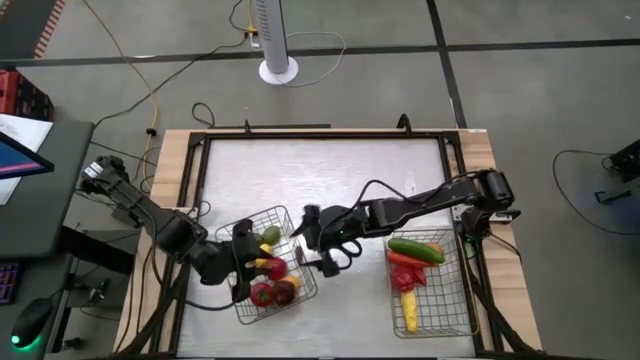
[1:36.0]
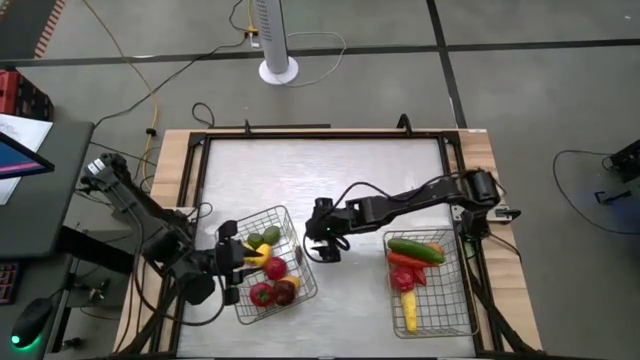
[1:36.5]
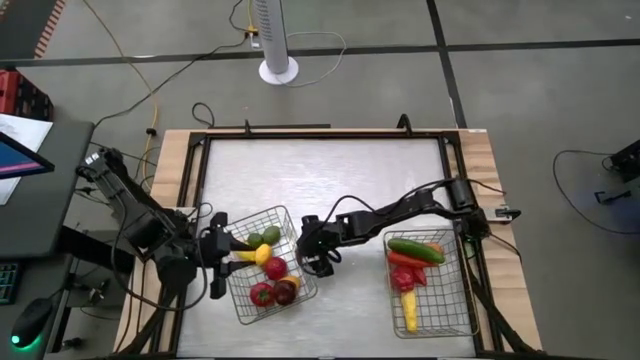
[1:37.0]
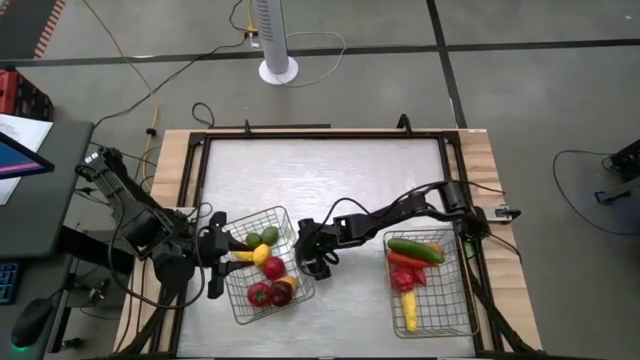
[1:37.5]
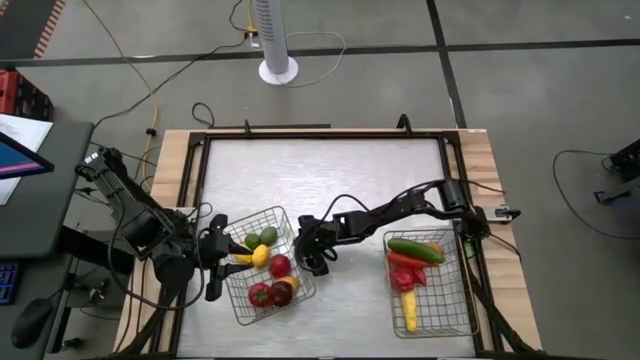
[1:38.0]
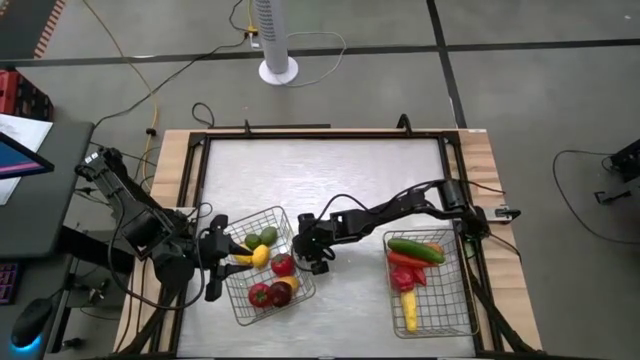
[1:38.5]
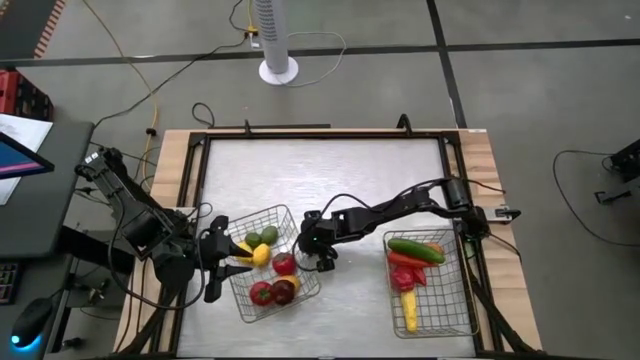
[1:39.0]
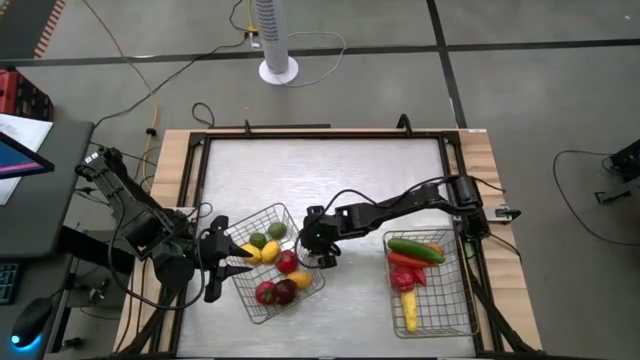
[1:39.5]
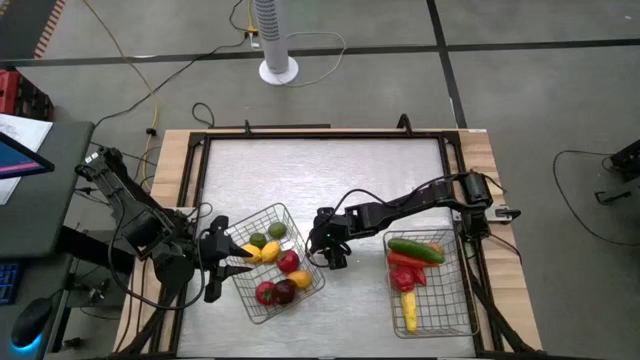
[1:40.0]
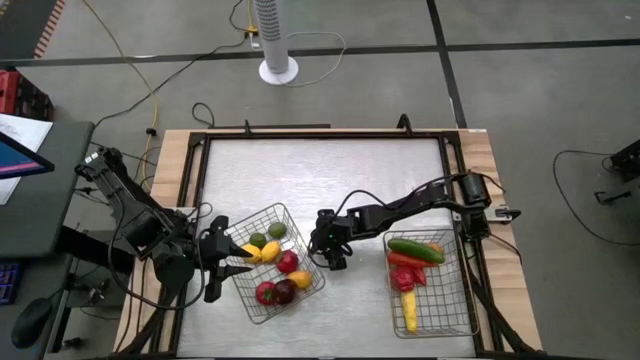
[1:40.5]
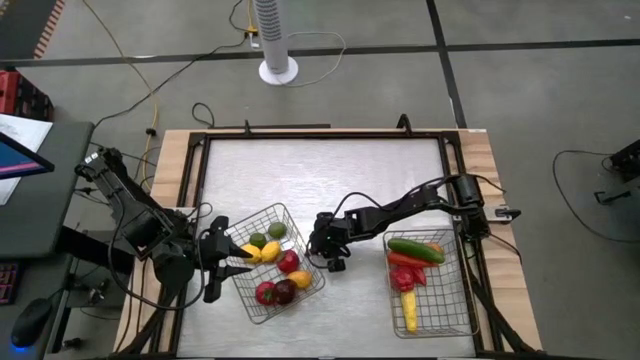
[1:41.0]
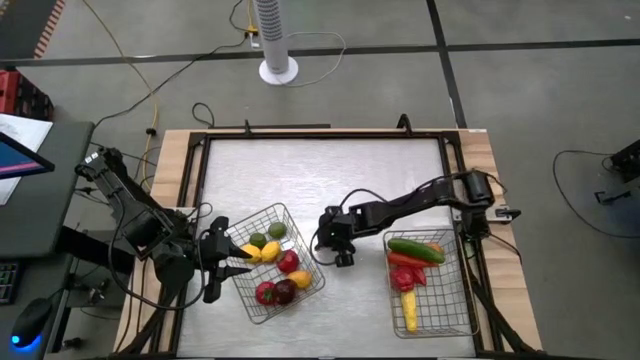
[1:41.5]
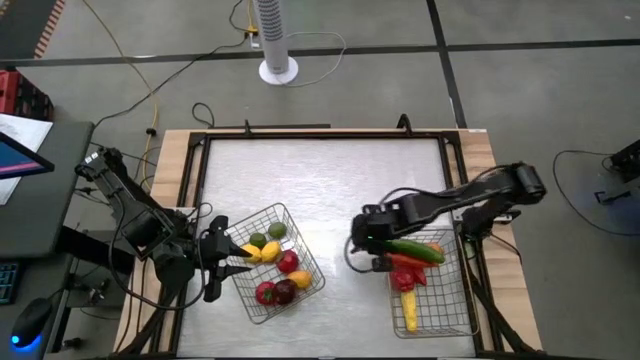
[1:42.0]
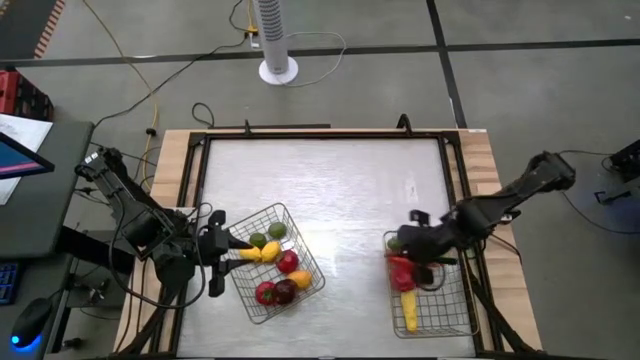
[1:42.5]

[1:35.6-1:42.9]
Task: Sort produce into baskets
Put the purple eggplant into the right wire basket

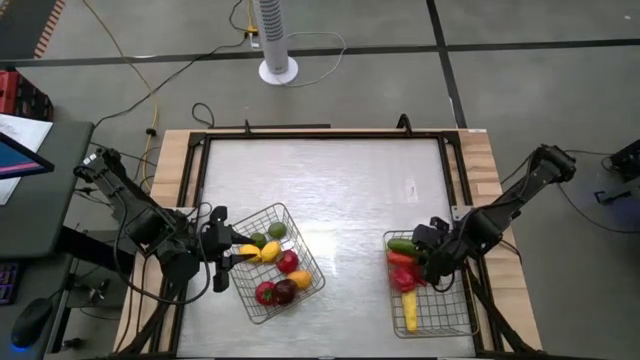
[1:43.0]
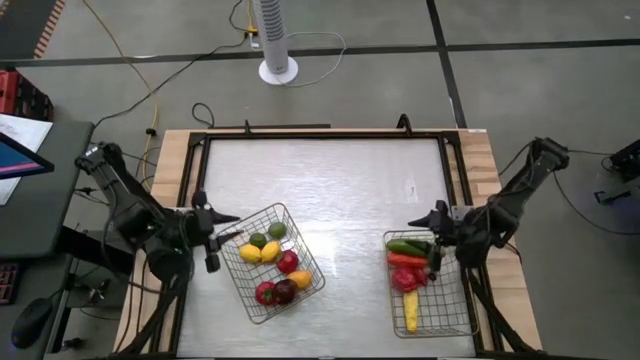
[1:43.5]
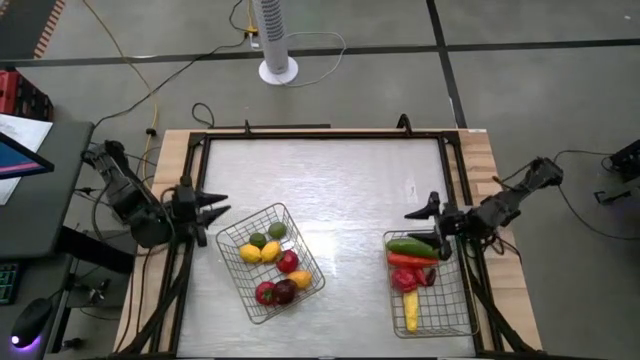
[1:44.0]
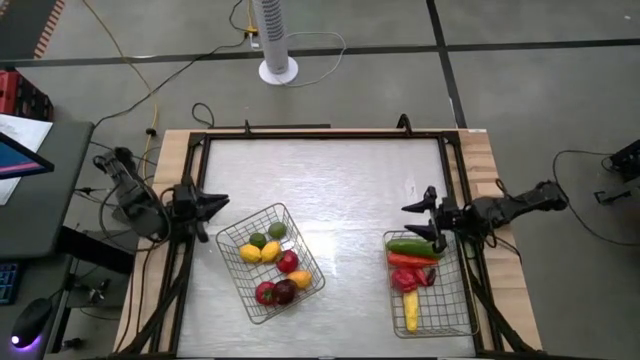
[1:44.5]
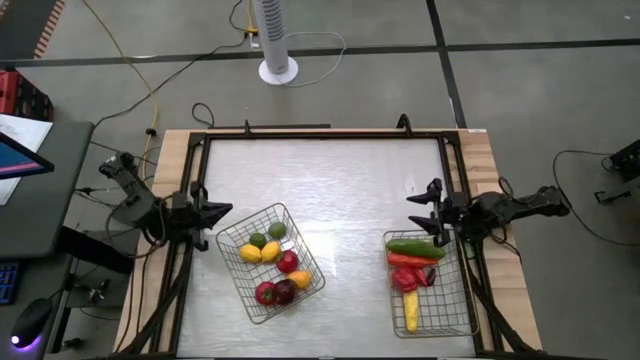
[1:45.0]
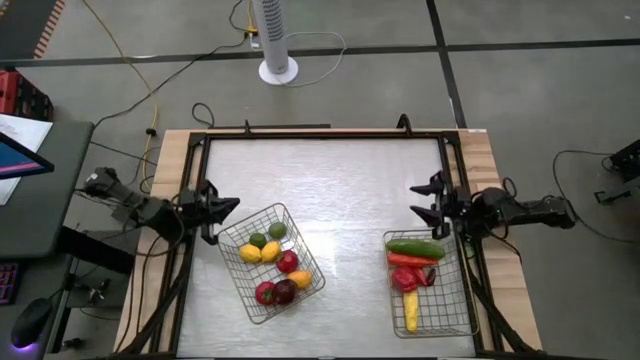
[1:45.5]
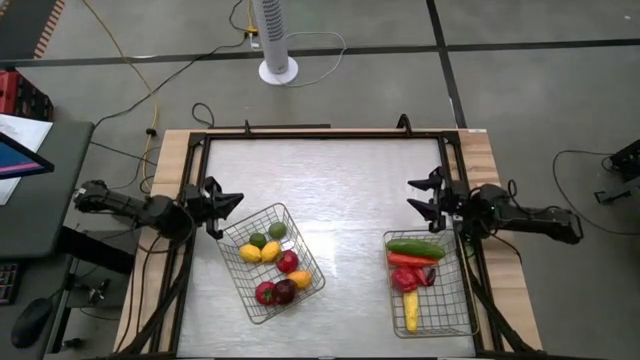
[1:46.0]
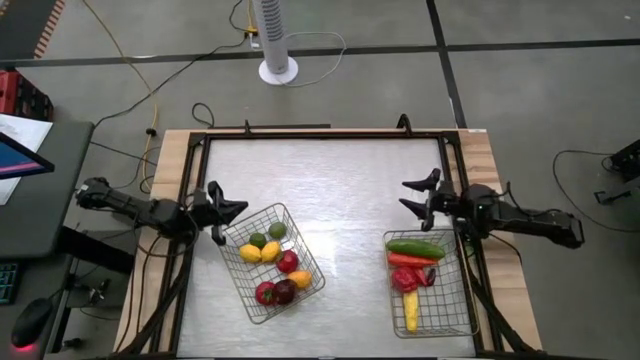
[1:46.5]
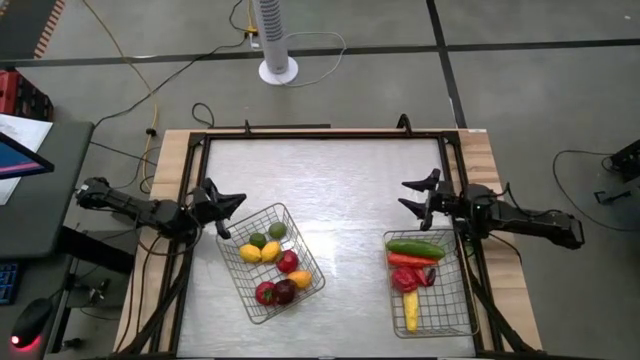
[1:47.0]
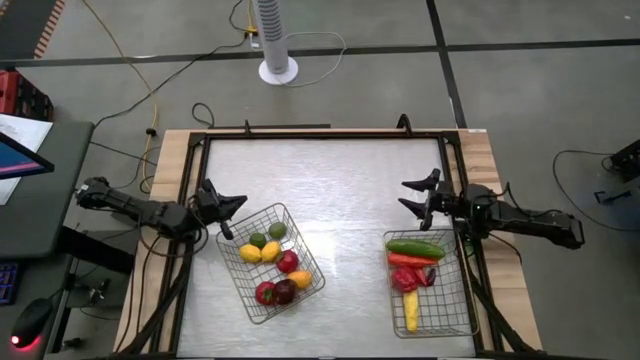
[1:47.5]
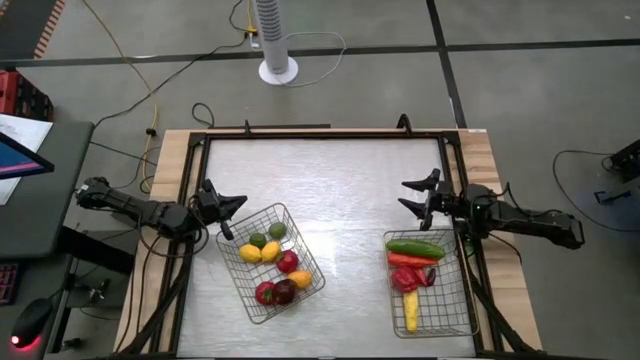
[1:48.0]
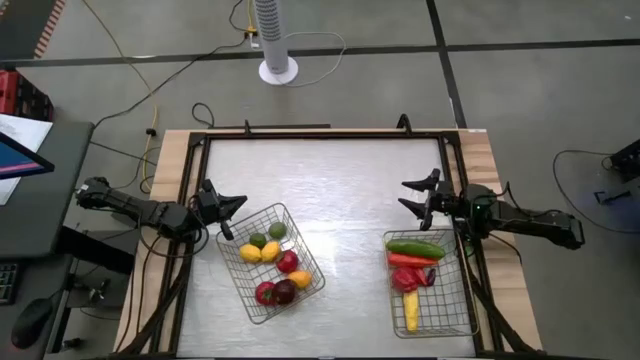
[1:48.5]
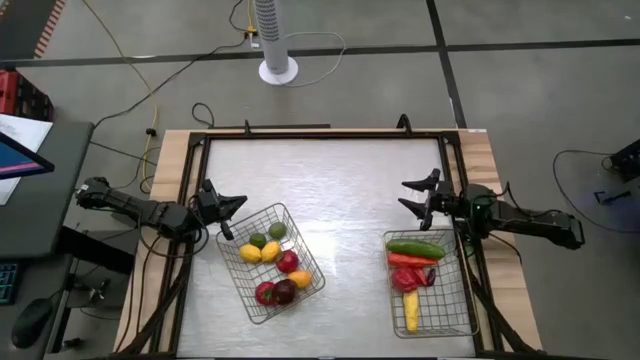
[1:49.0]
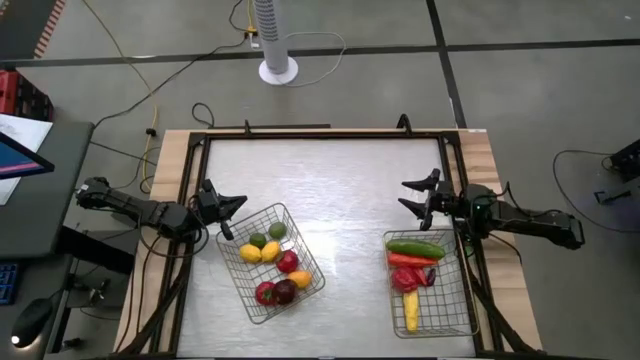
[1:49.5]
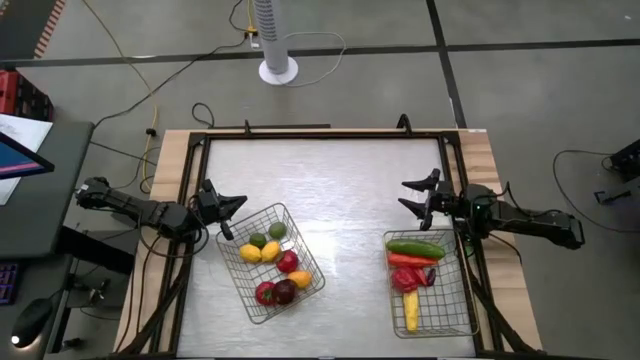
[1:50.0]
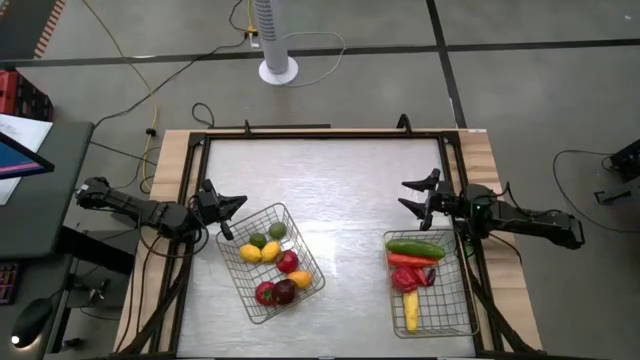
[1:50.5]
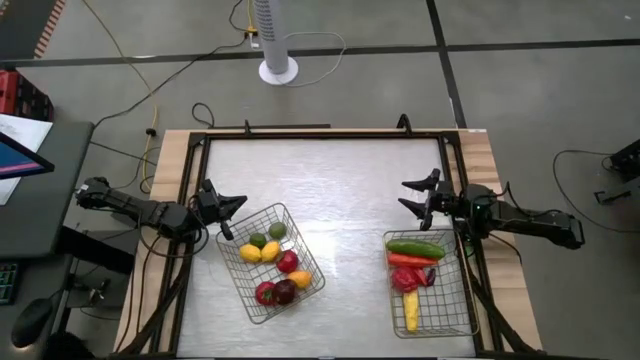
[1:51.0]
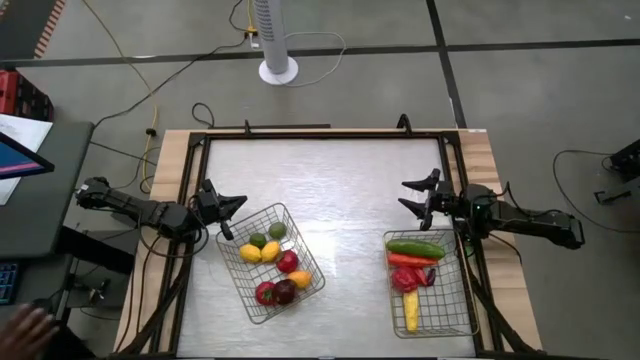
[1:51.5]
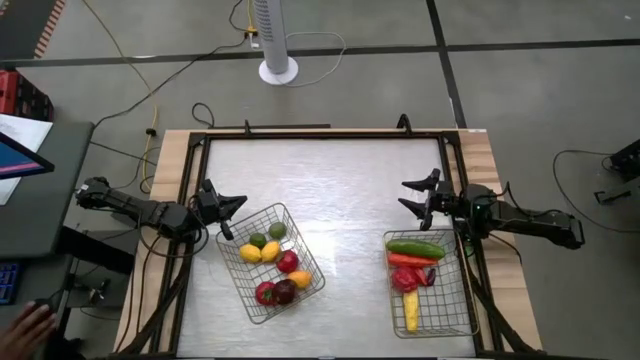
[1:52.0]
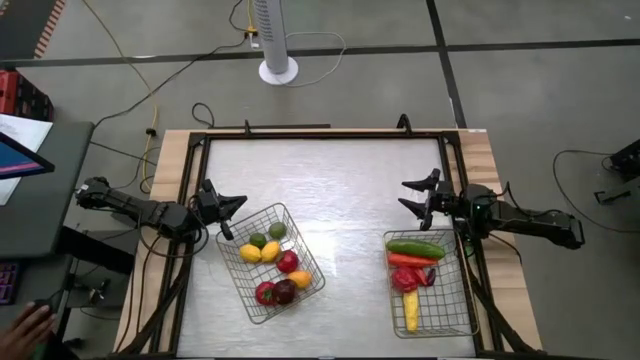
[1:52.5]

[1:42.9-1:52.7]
Return to Home Position

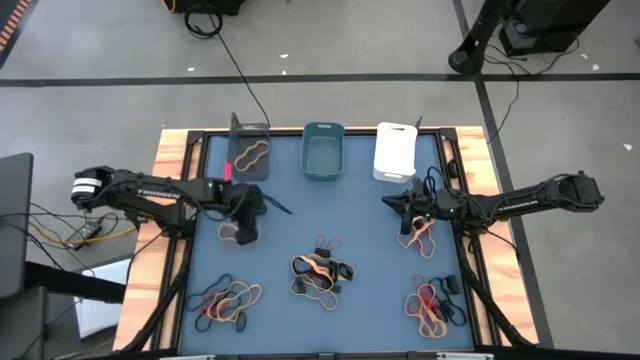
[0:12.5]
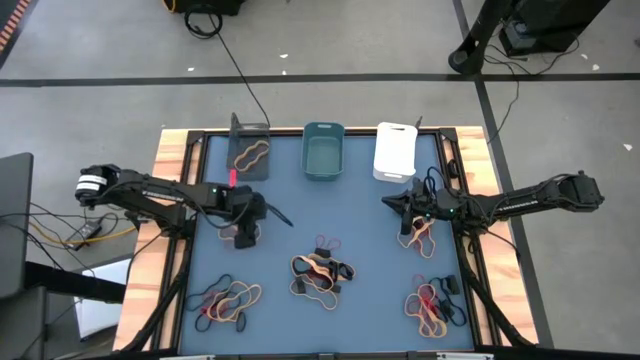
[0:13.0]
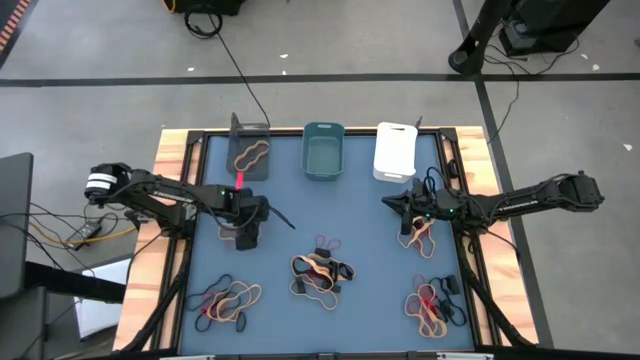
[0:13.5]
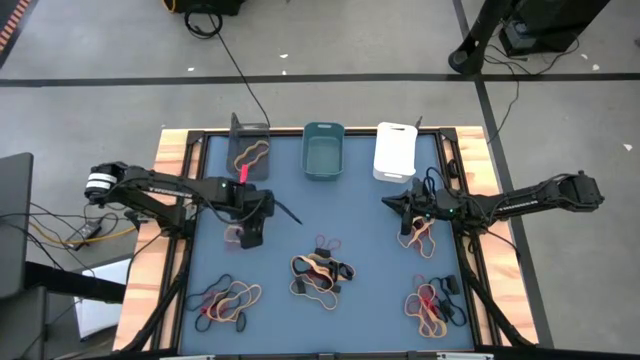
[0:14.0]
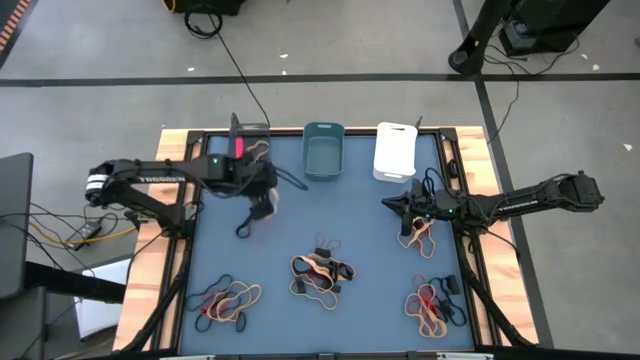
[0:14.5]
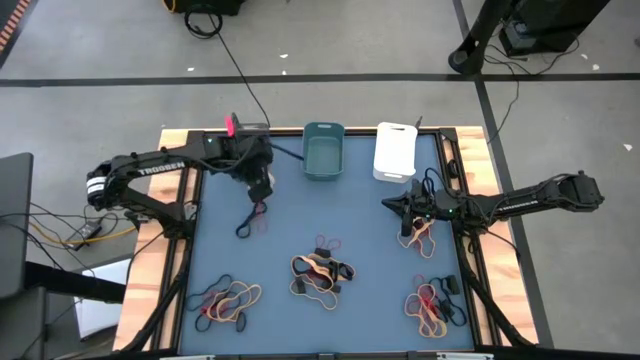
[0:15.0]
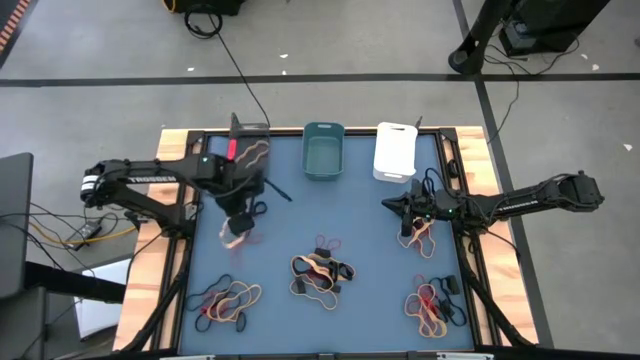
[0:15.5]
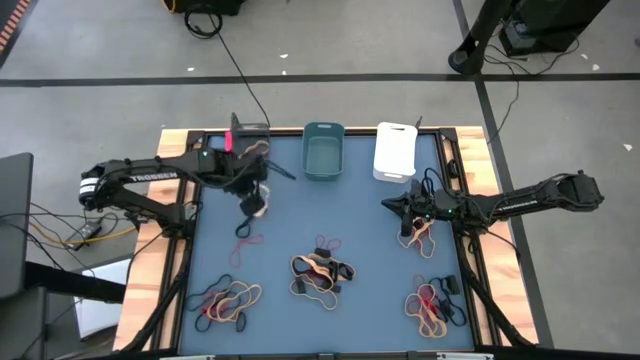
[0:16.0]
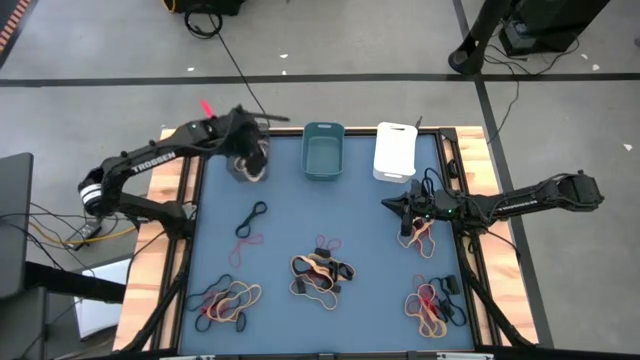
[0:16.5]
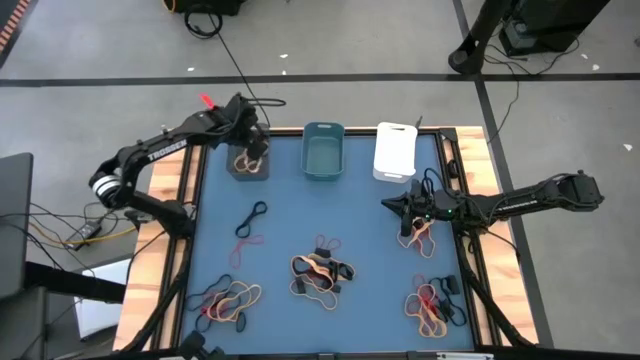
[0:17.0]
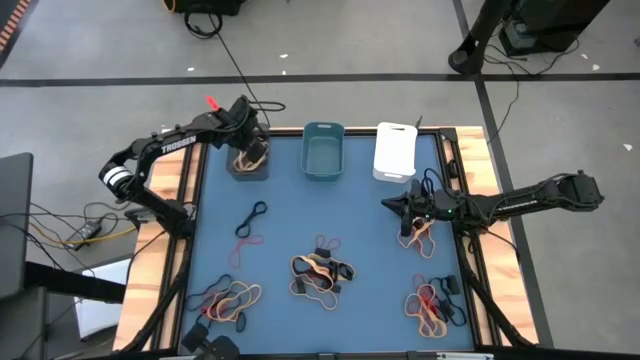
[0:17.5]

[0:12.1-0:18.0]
Task: Sort rubber bands into baskets
Put the yellow rubber band into the black bin
